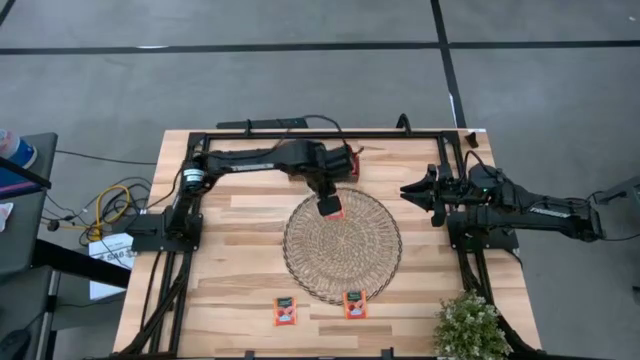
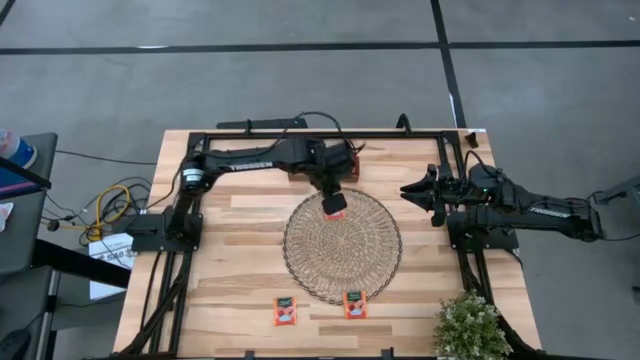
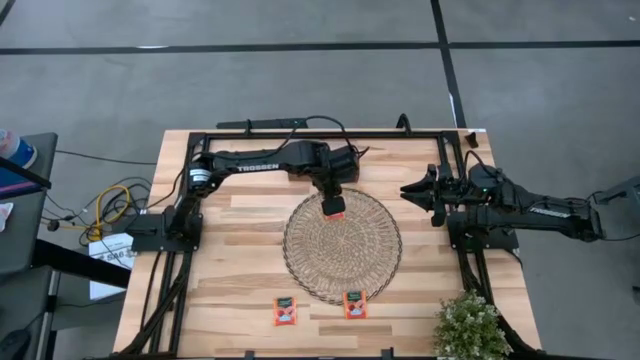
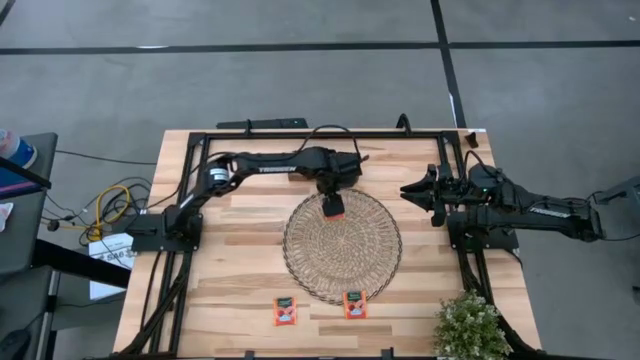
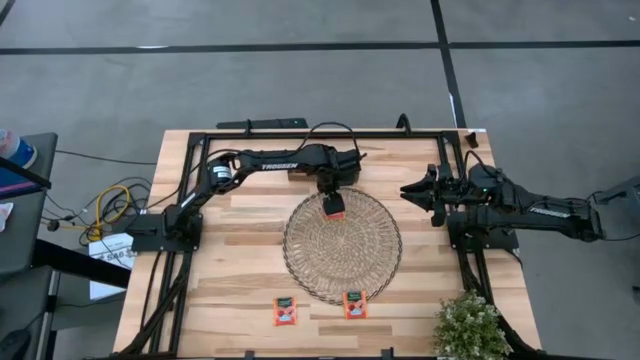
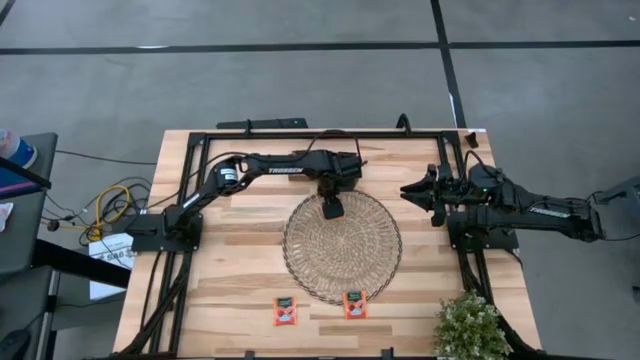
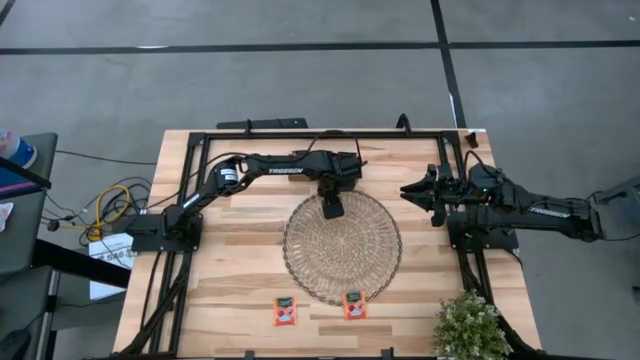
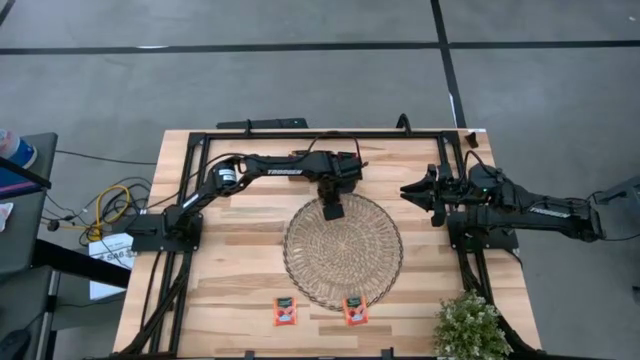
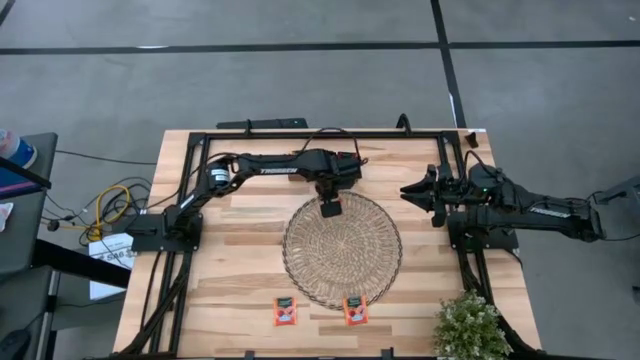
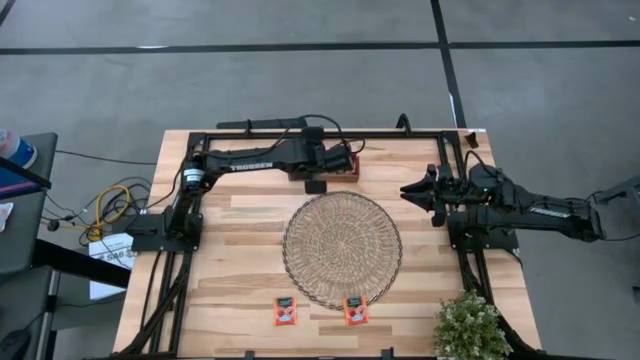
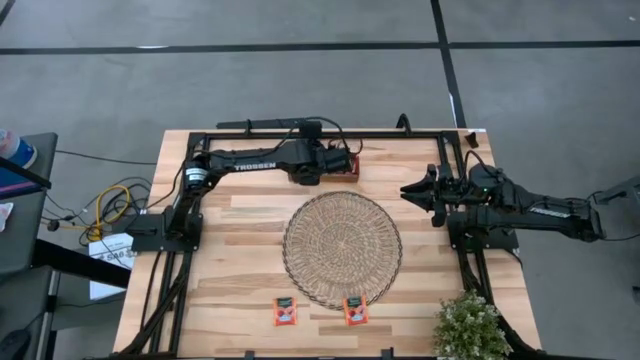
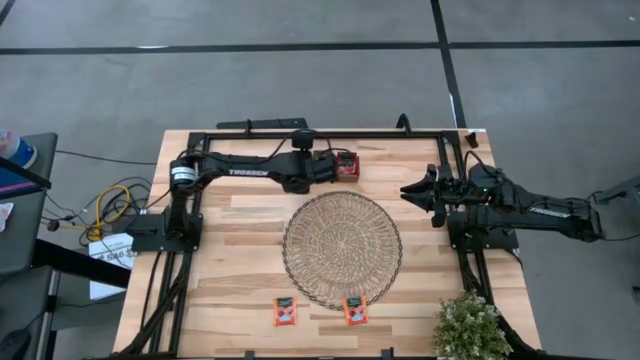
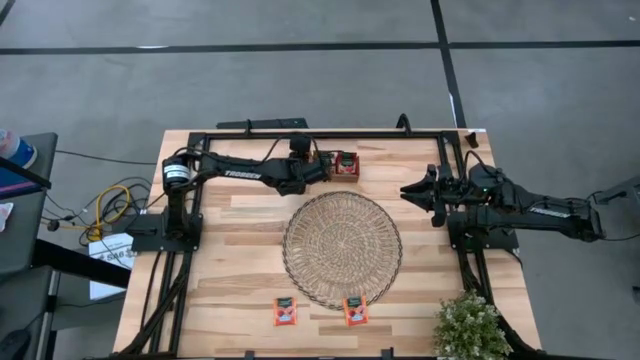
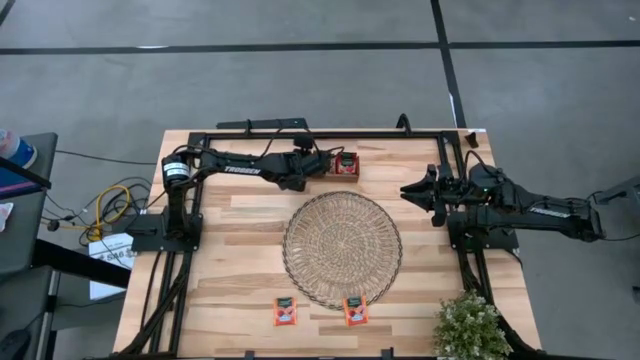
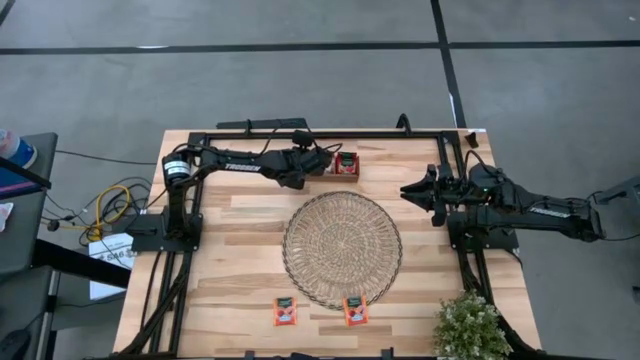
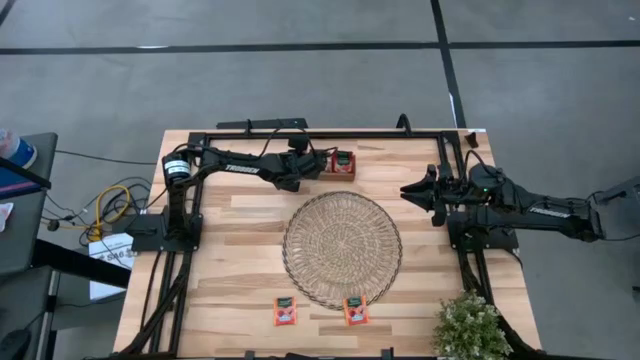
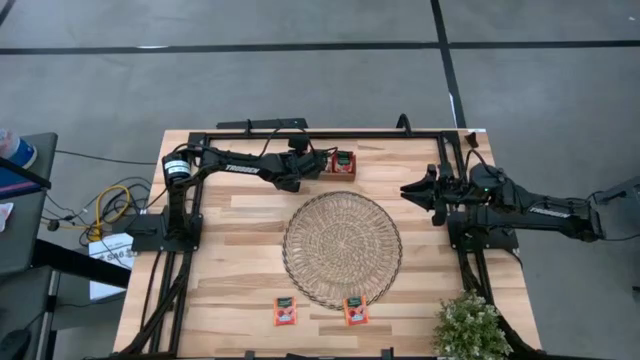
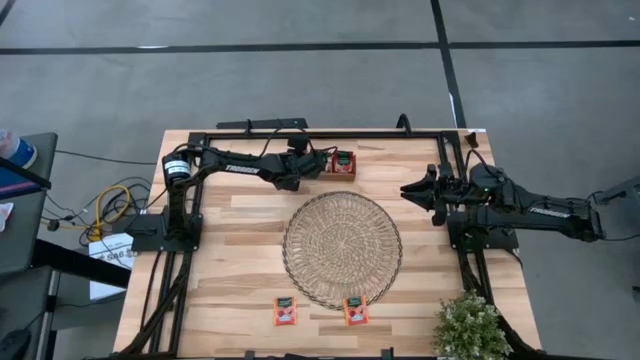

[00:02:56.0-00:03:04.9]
Task: Pick & Place Tea
Put the orange tea bag into the left section of the brown wooden organizer

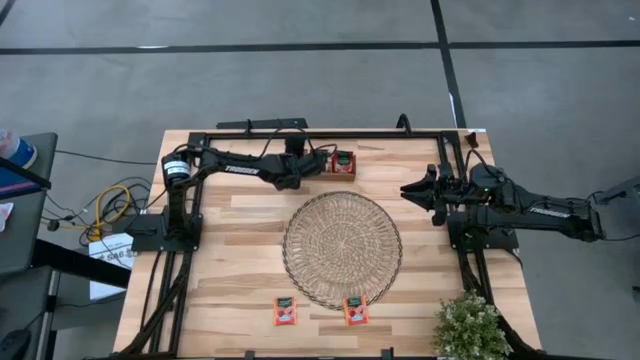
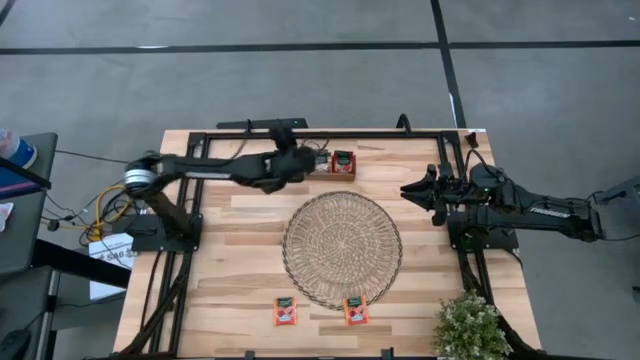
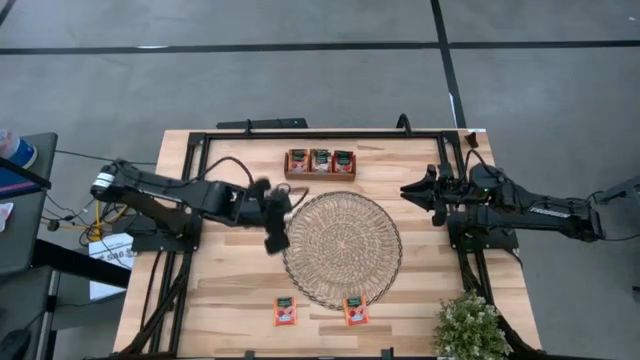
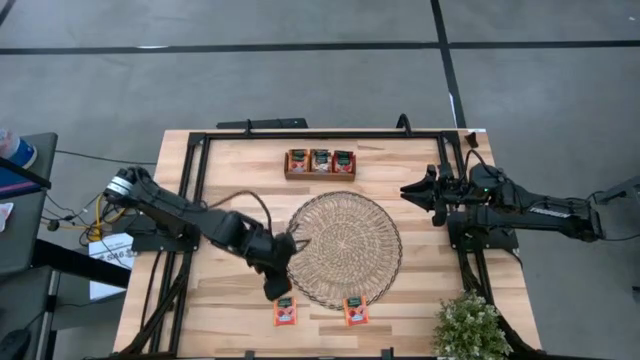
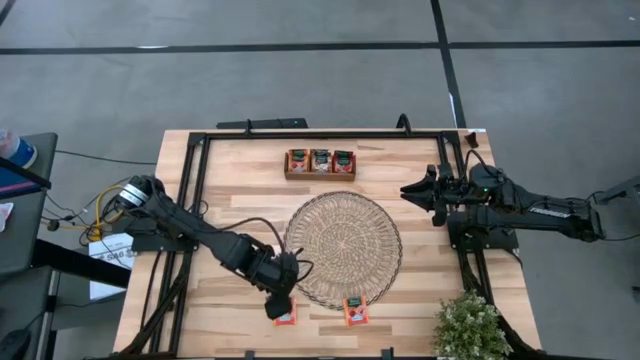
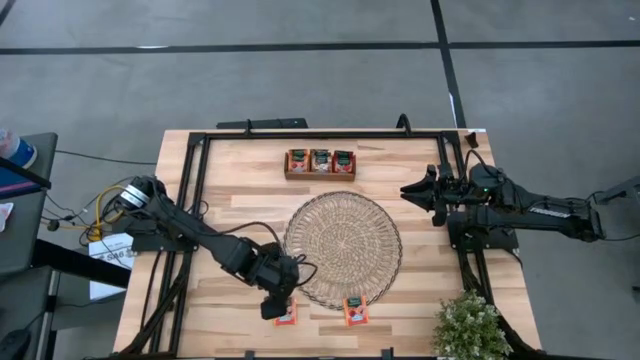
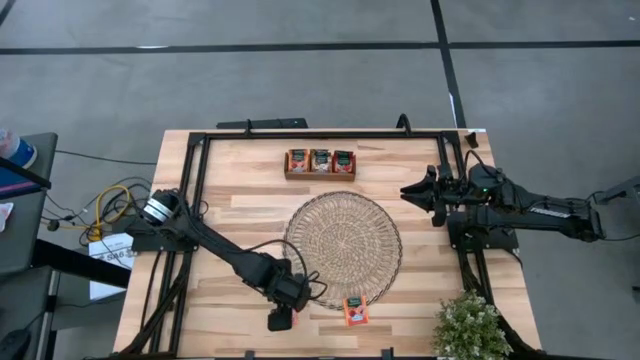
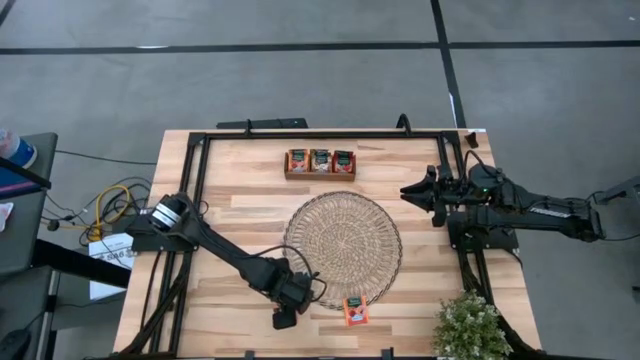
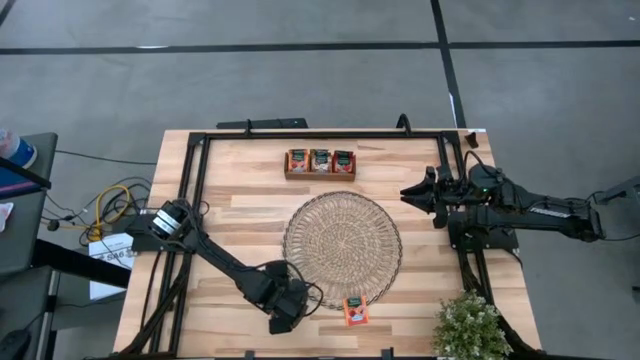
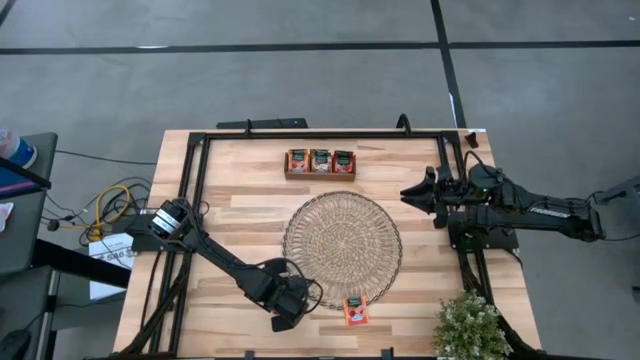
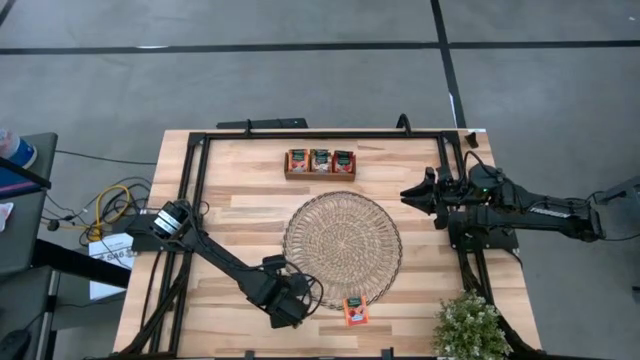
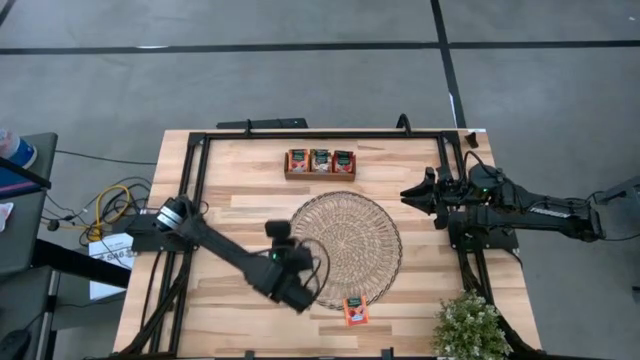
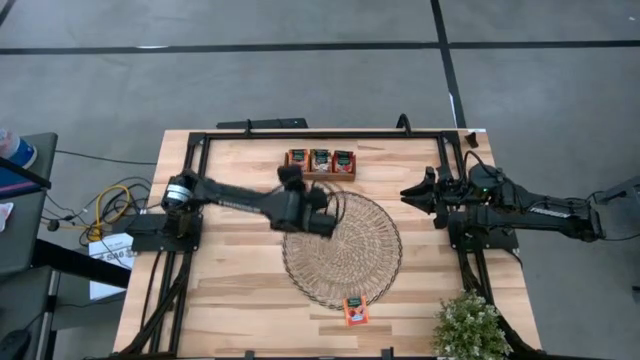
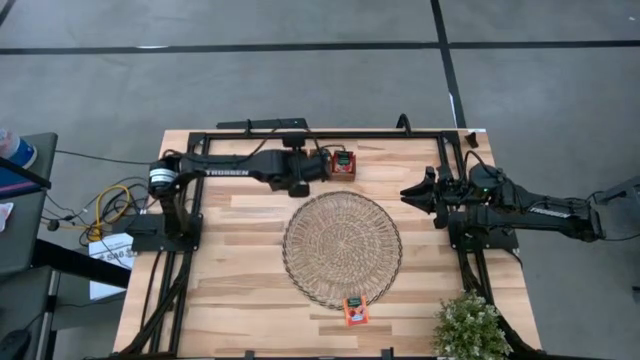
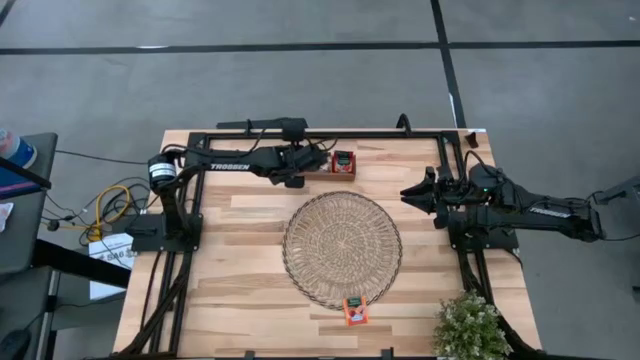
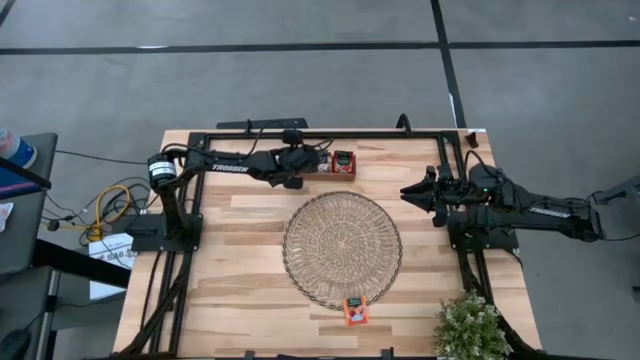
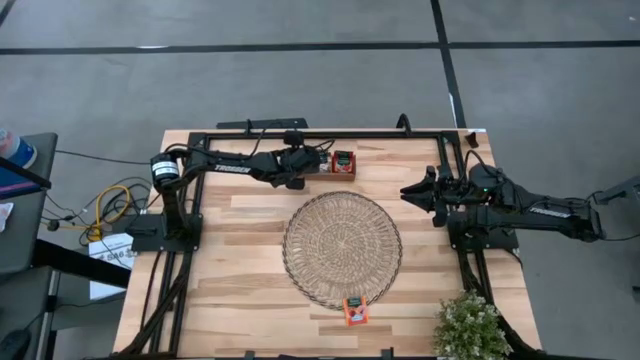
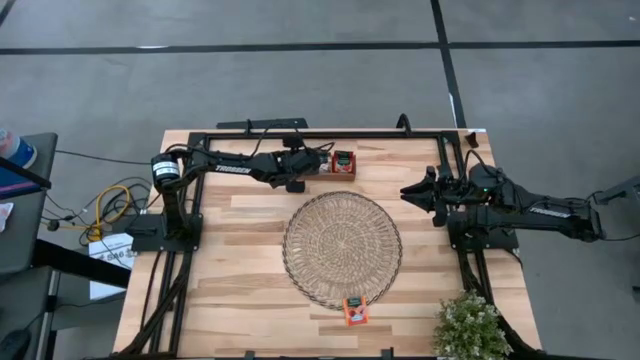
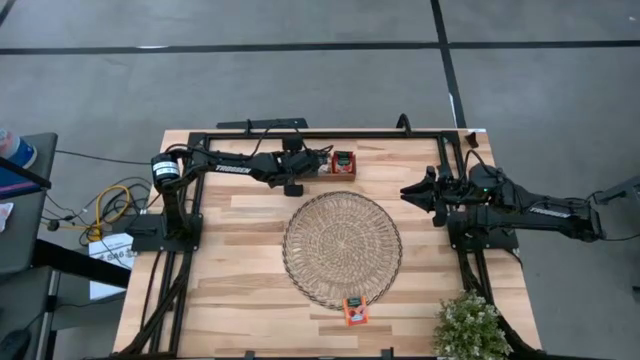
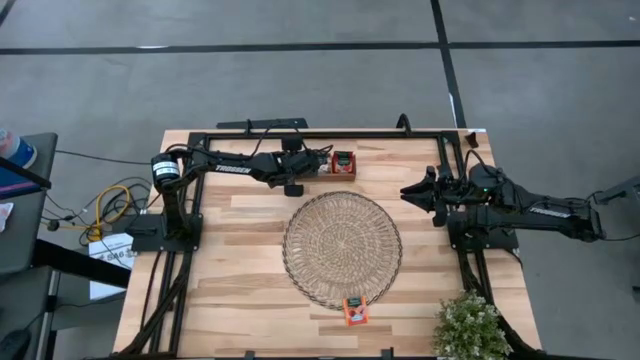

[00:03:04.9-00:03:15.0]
Put the orange tea bag into the left section of the brown wooden organizer

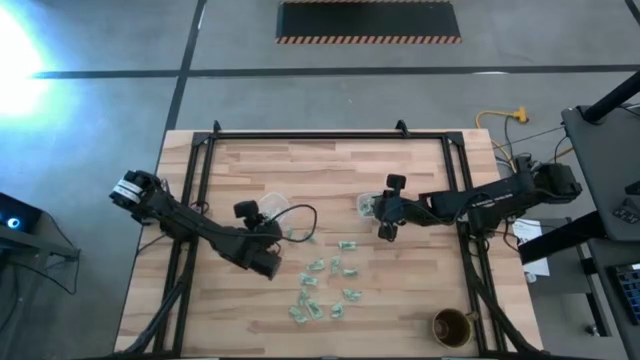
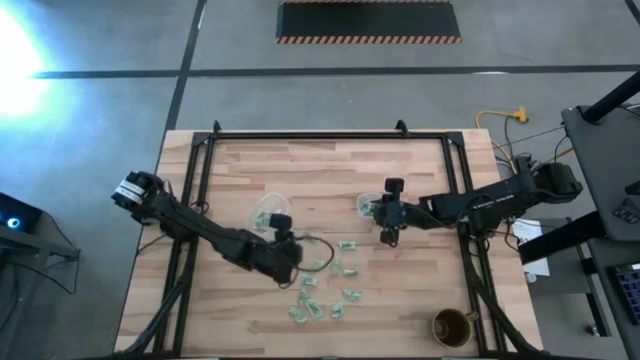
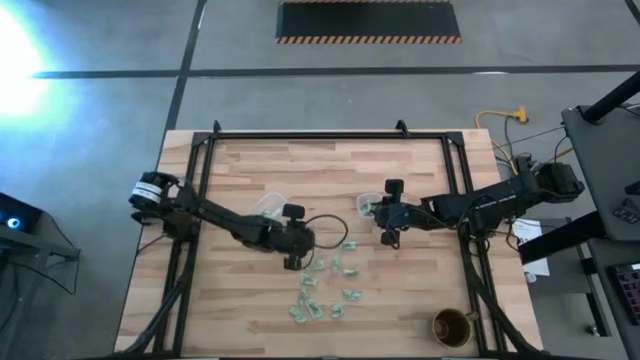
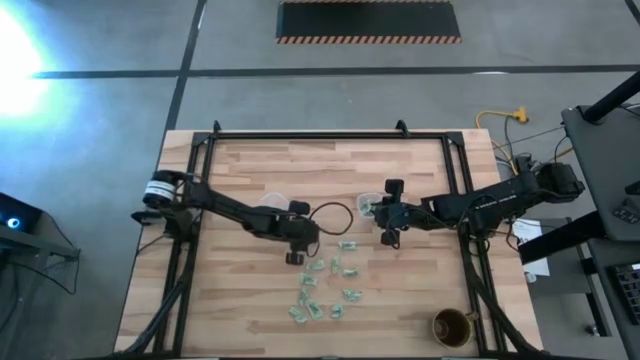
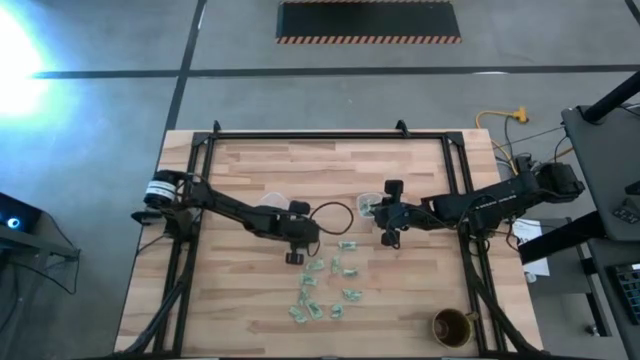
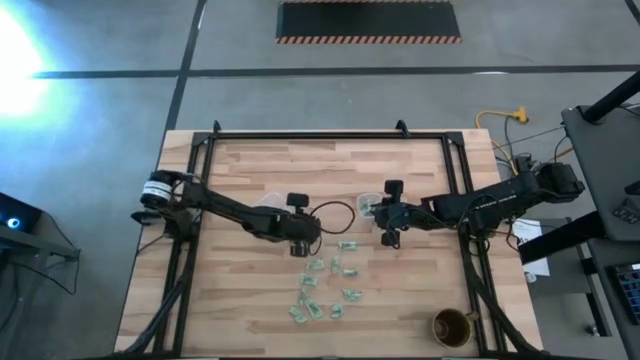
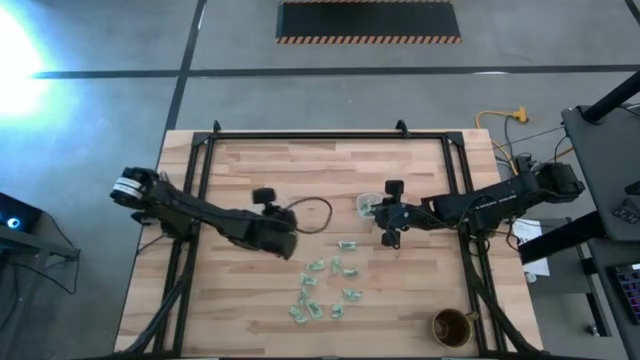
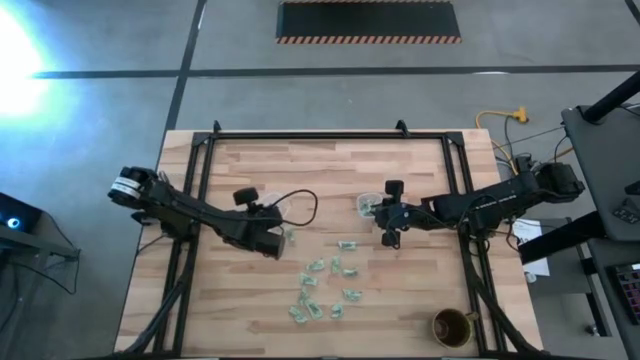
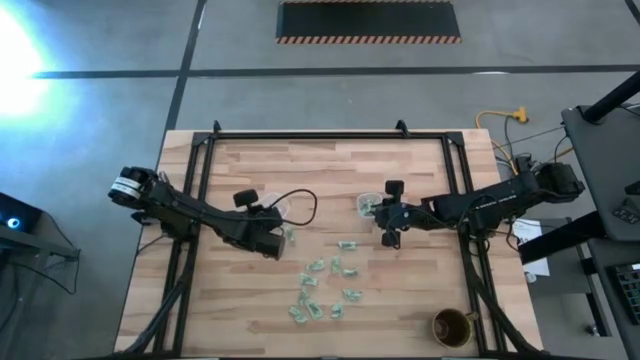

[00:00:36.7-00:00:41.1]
Task: Pick and place Stevia / Truvia into bins
Put the light green stevia packet into the left transparent container
